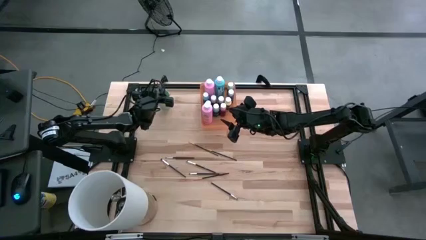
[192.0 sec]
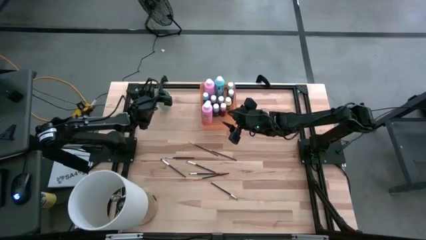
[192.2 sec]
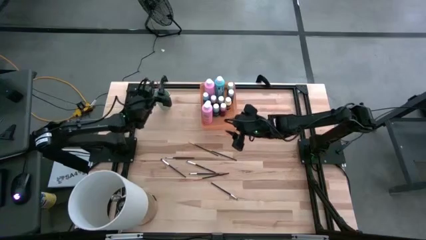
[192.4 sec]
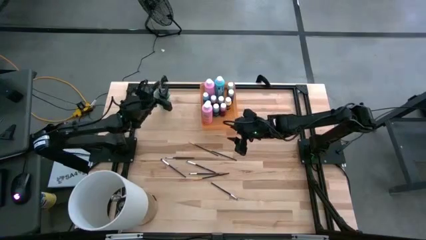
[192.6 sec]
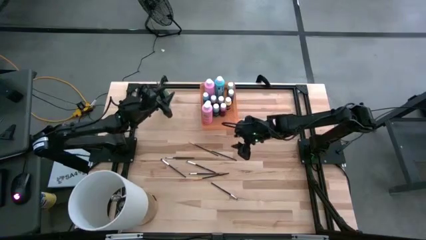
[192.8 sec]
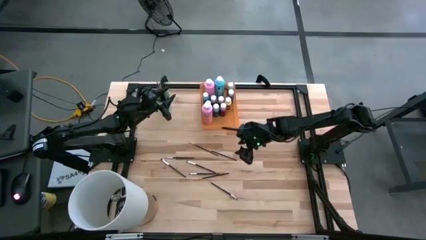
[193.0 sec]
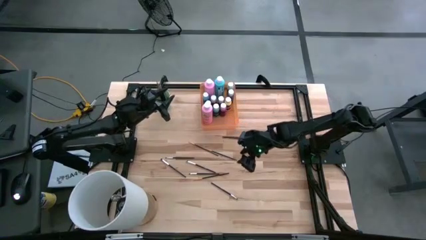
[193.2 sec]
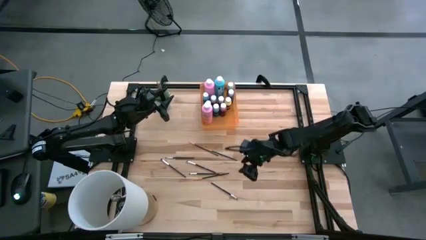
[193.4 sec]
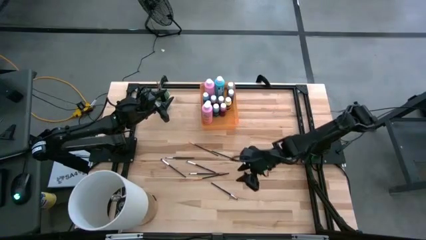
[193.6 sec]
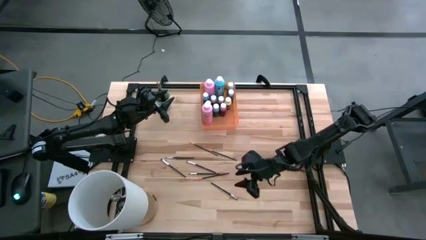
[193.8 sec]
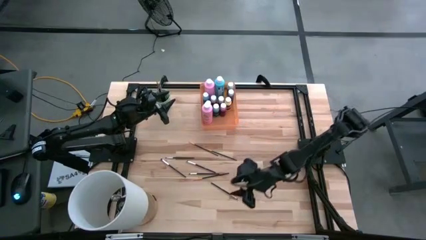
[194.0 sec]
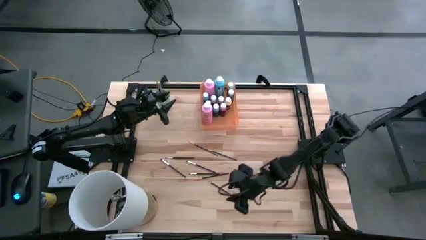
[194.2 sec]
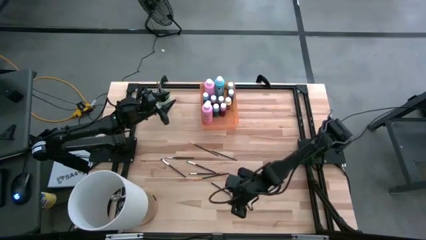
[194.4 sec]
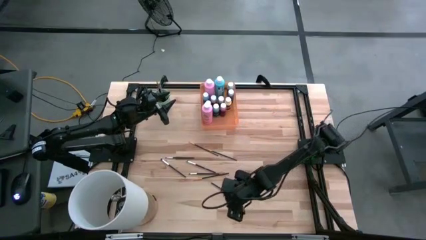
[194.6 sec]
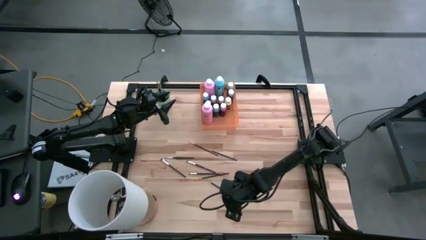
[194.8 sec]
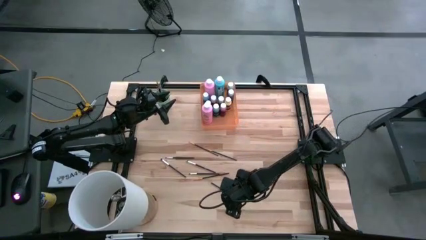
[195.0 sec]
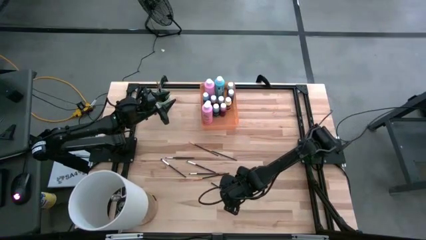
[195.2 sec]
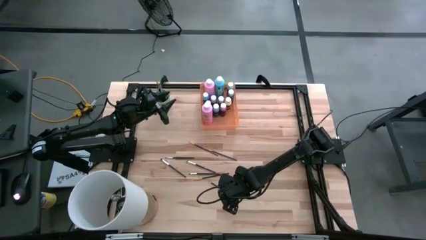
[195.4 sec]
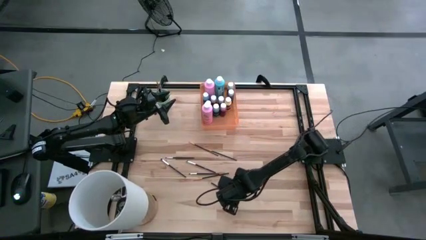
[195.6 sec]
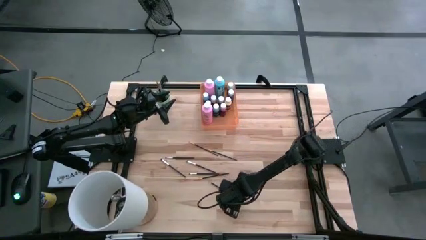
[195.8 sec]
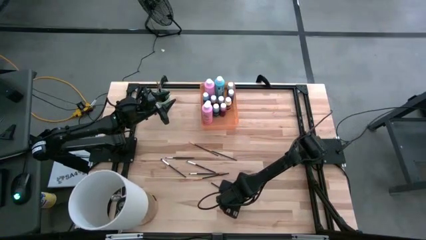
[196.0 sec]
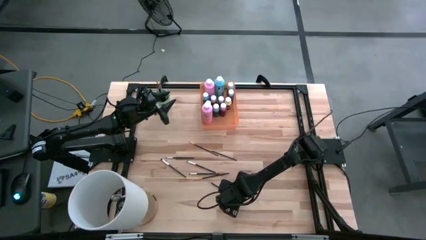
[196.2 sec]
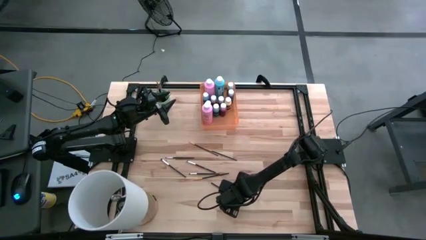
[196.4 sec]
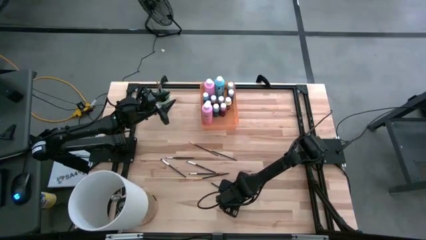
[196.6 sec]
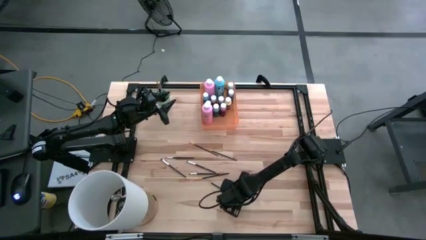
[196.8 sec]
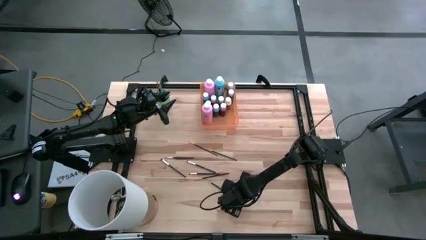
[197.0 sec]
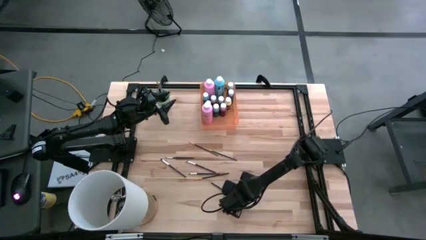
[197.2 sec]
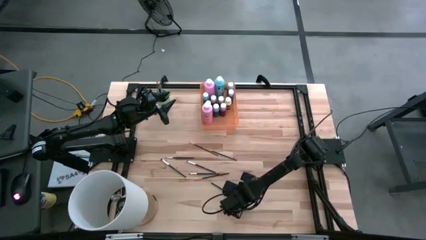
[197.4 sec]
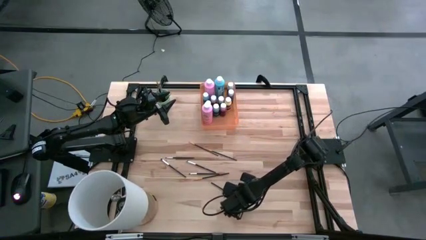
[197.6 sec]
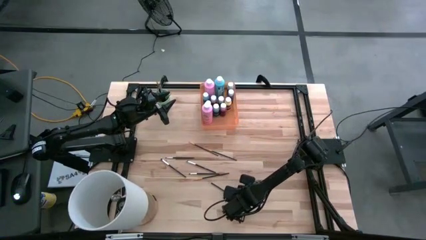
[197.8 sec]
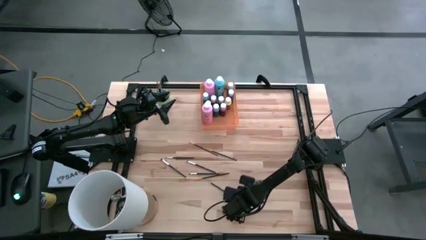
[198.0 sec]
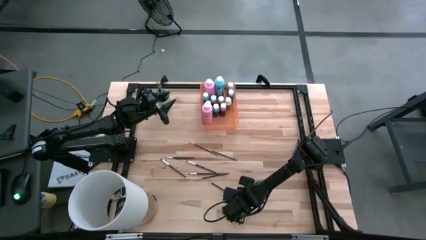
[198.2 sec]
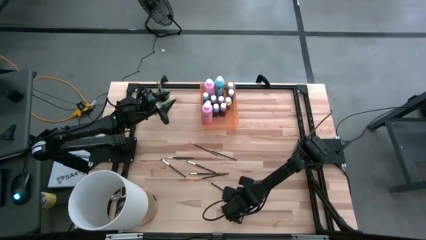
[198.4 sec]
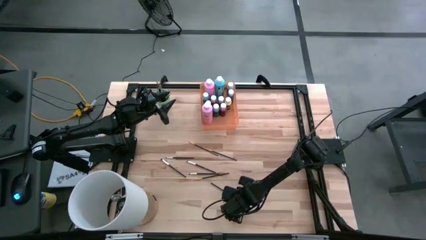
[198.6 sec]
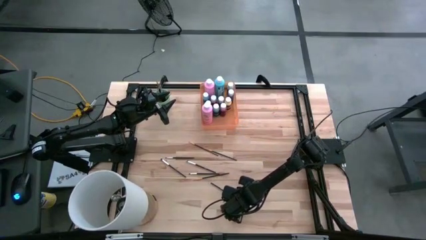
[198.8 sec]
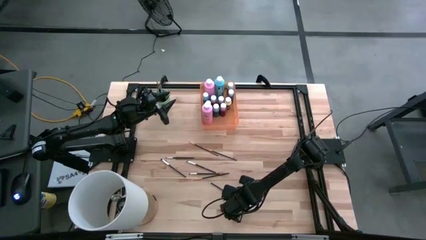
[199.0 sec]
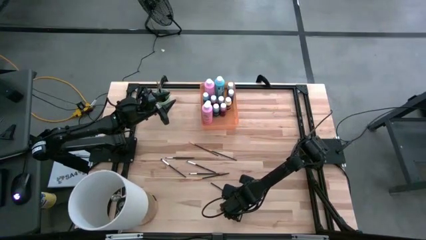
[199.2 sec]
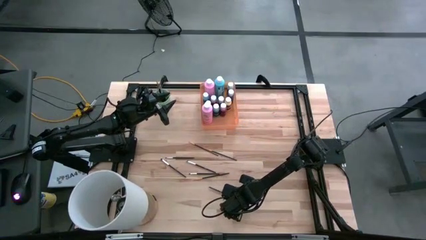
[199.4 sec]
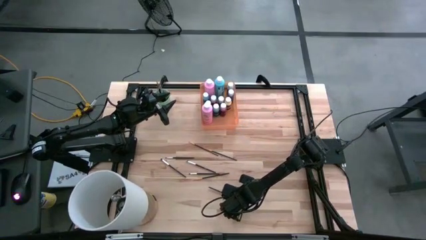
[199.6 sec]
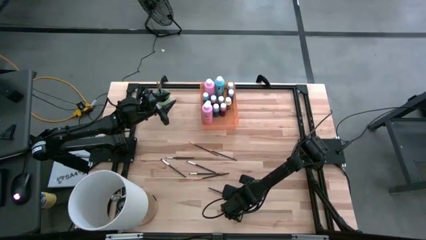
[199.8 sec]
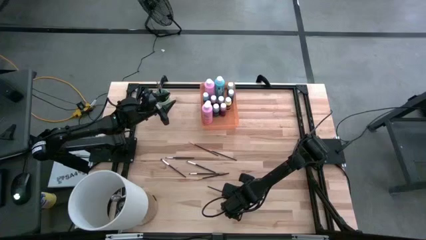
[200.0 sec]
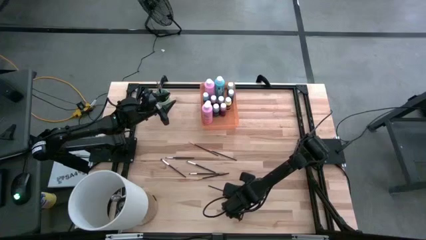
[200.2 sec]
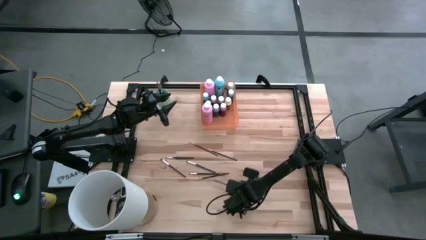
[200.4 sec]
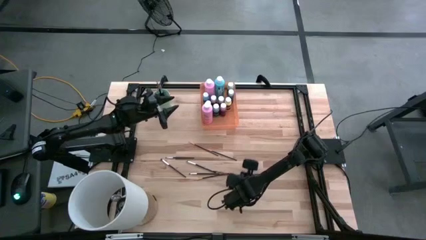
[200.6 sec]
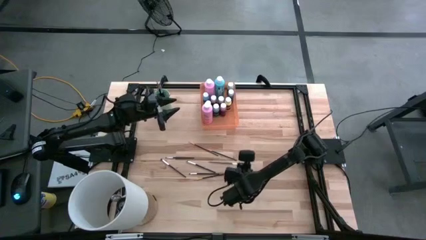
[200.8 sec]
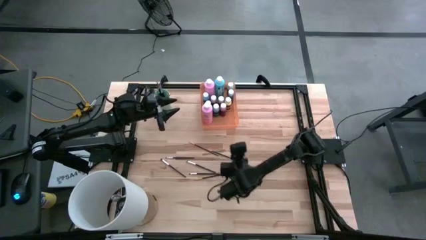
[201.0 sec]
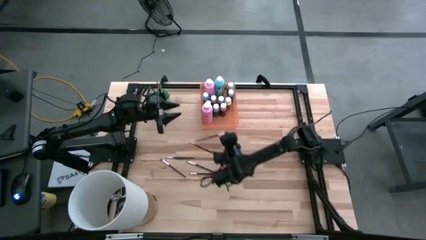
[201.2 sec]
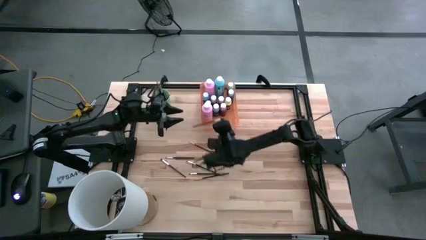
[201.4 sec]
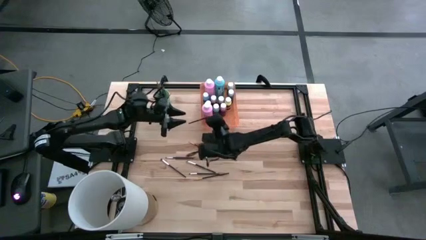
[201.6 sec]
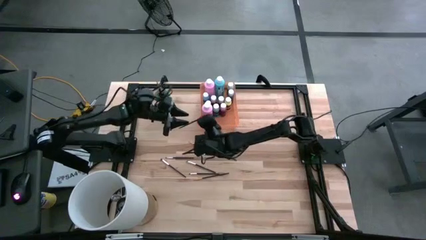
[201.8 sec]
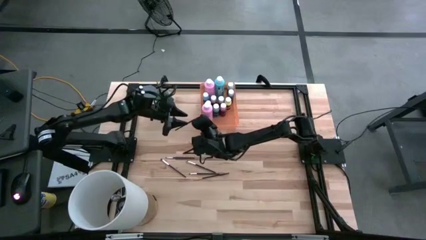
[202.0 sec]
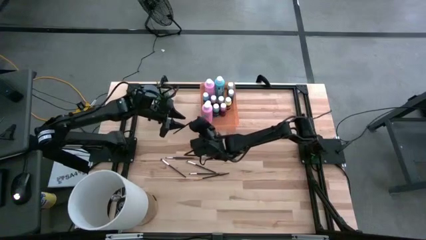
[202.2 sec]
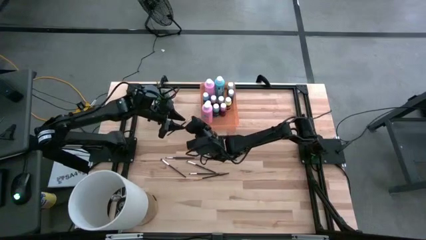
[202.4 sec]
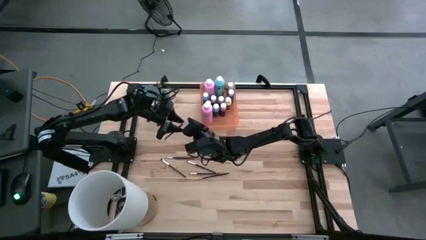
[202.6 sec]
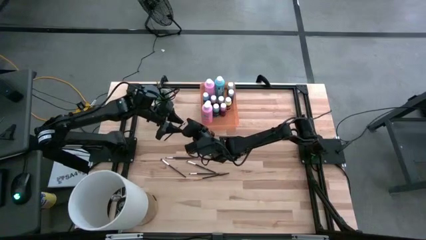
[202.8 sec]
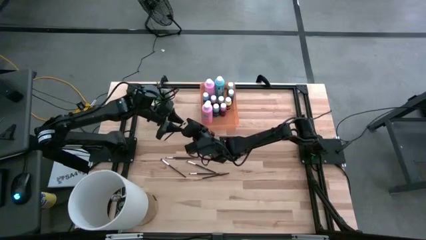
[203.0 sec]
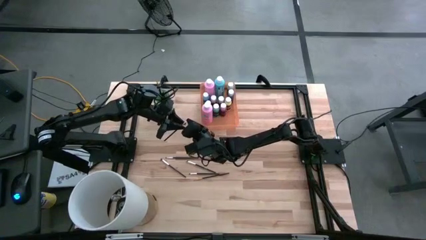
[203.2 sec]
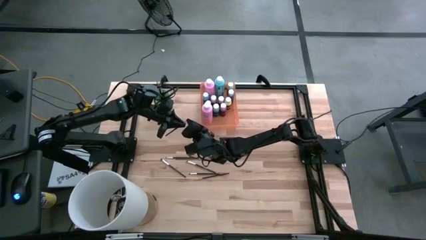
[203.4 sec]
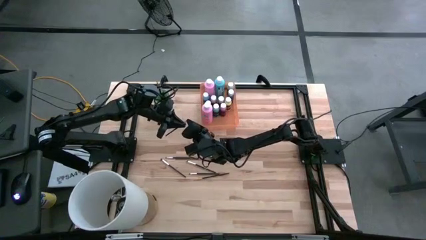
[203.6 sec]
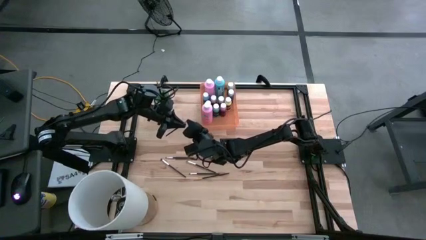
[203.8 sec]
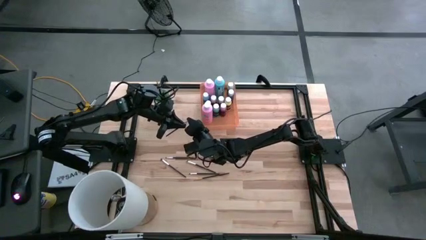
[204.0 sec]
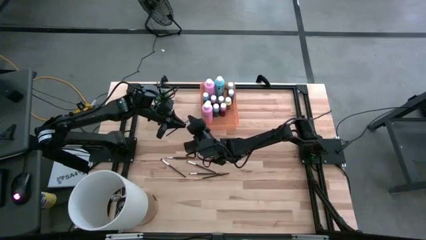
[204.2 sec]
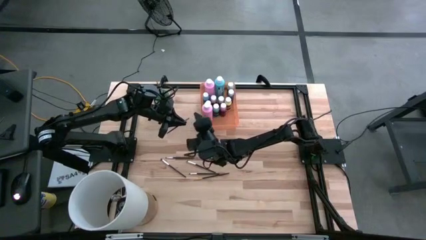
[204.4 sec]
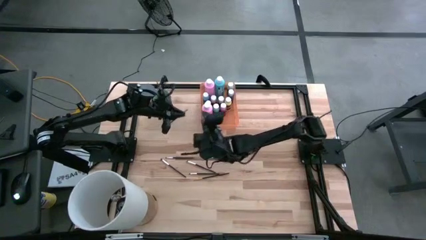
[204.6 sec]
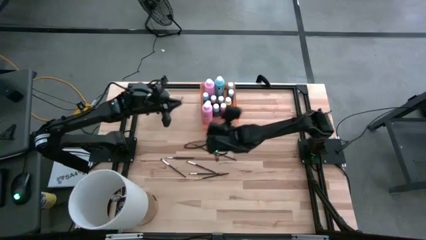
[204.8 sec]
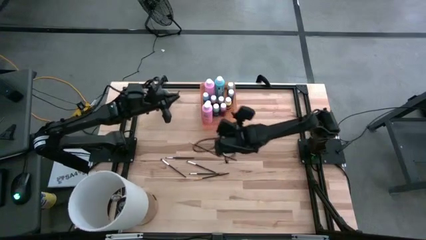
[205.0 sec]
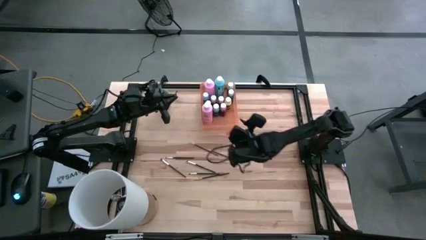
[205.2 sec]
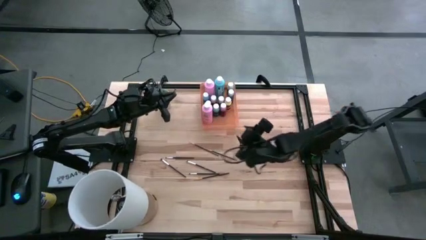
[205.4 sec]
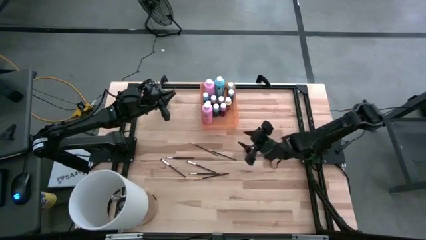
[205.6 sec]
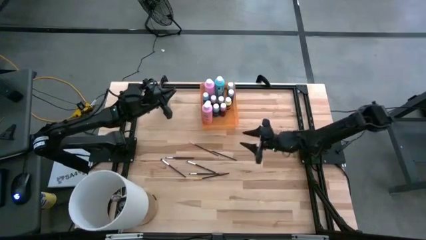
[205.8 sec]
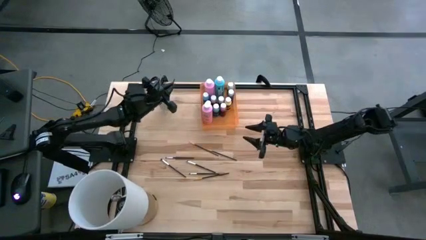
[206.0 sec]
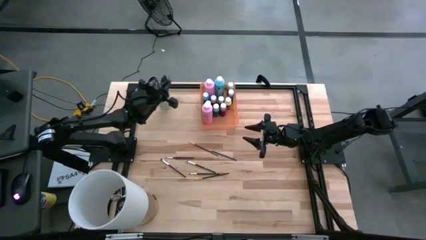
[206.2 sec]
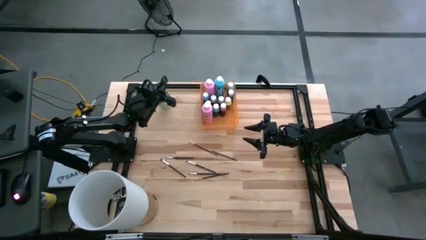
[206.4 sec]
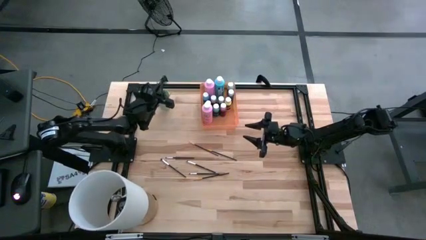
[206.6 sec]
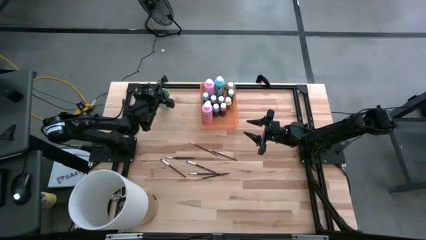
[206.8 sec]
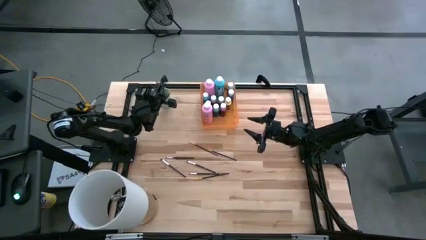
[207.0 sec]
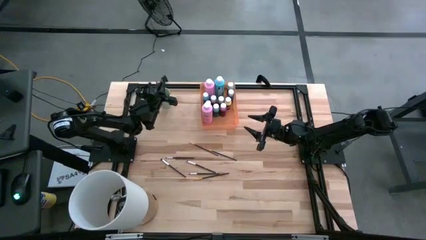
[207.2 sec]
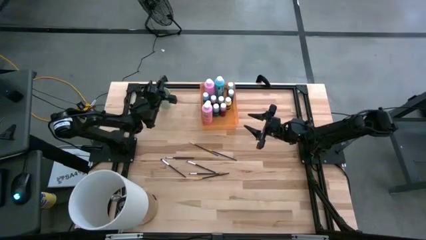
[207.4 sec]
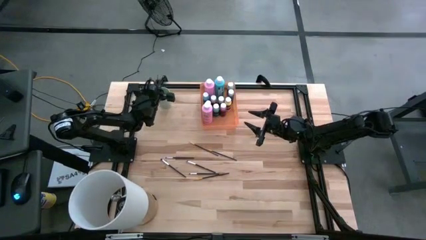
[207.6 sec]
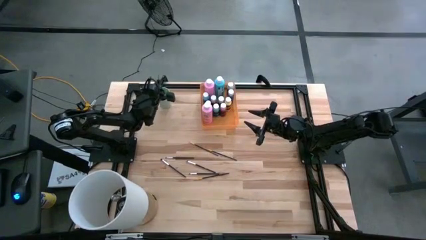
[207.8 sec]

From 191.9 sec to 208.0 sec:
Task: Pick & Place Paint Supplies
Put the white paintbrush into the cup
